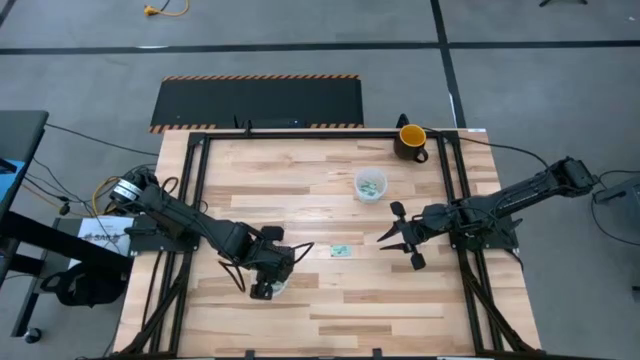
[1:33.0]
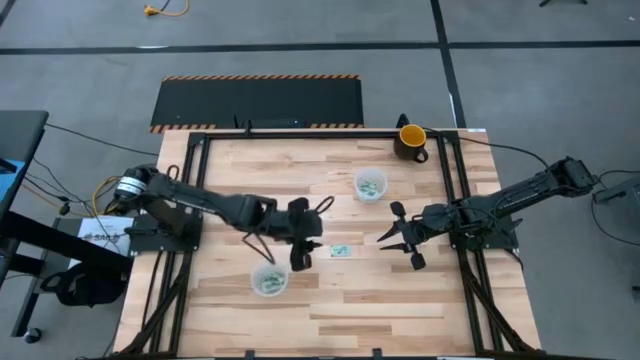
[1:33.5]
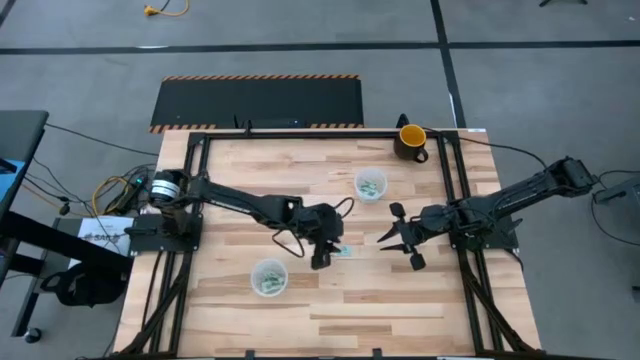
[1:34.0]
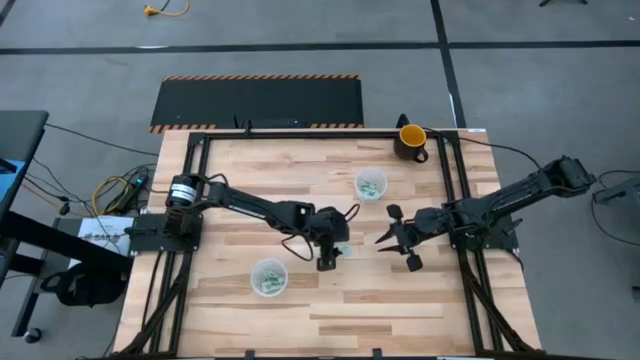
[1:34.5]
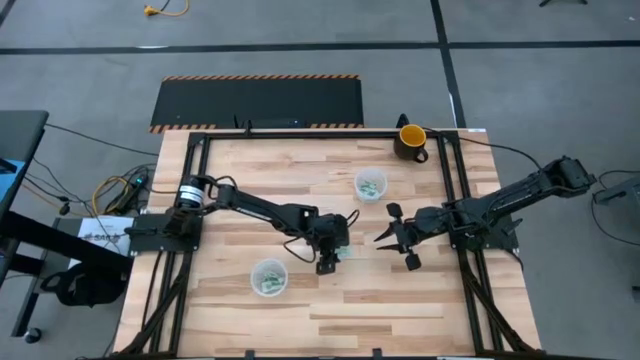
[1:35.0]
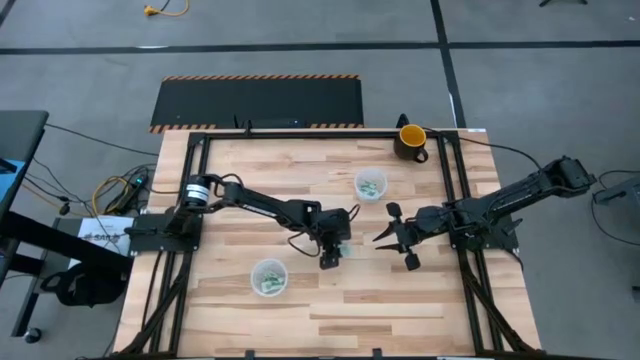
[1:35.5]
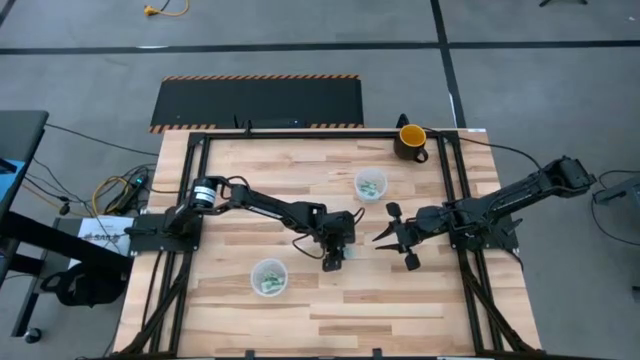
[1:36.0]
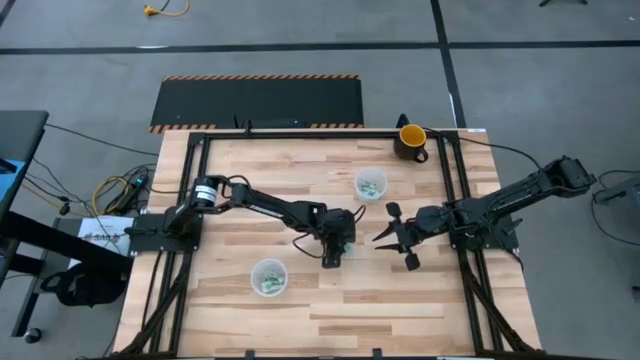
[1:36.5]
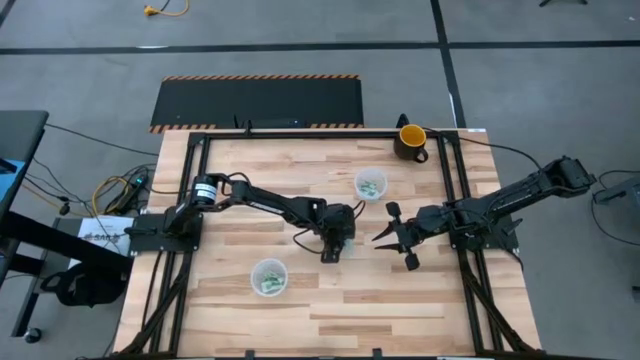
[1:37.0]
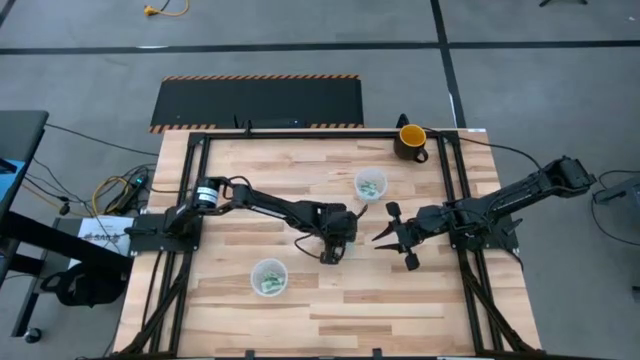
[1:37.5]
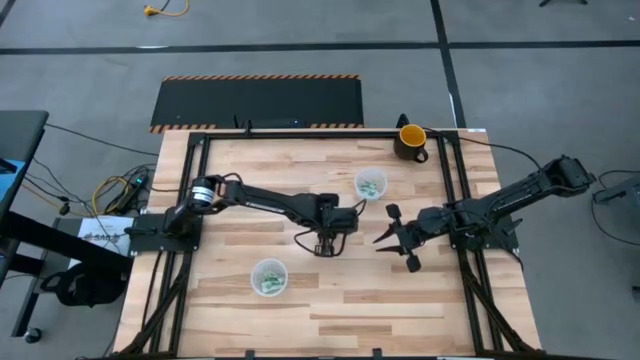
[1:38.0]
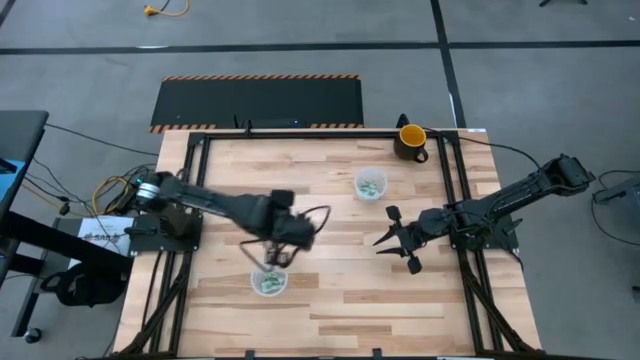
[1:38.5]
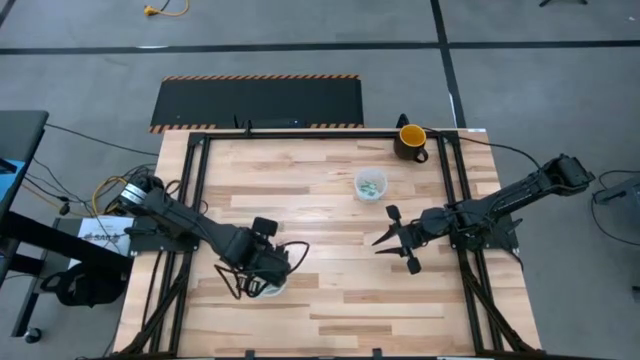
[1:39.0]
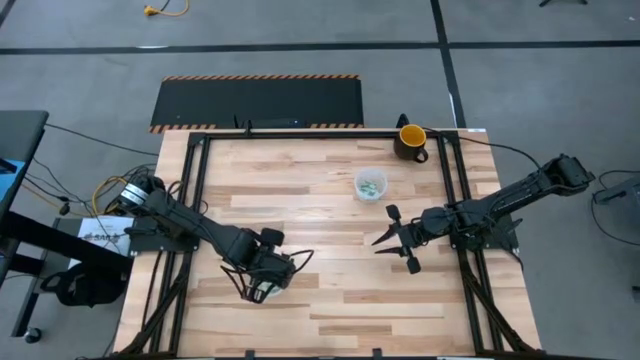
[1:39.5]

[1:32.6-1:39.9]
Task: Pick and place Stevia / Truvia into bins
Put the stevia packet into the bottom transparent container

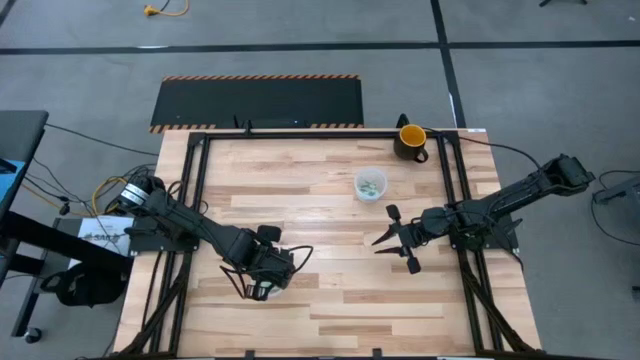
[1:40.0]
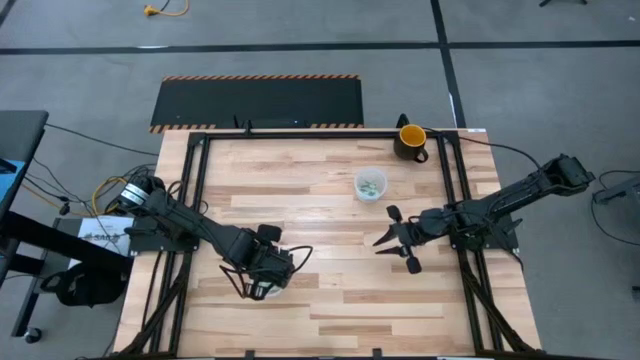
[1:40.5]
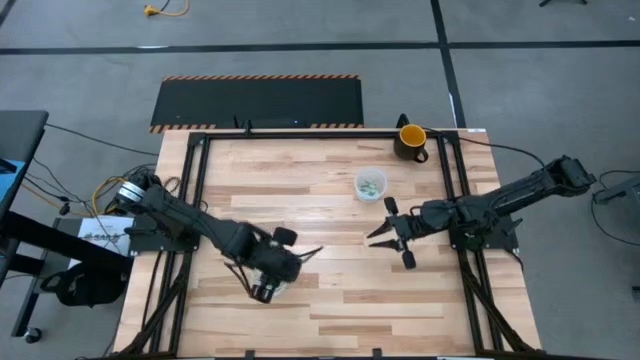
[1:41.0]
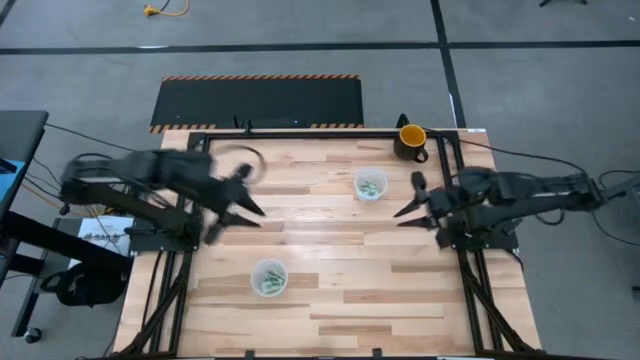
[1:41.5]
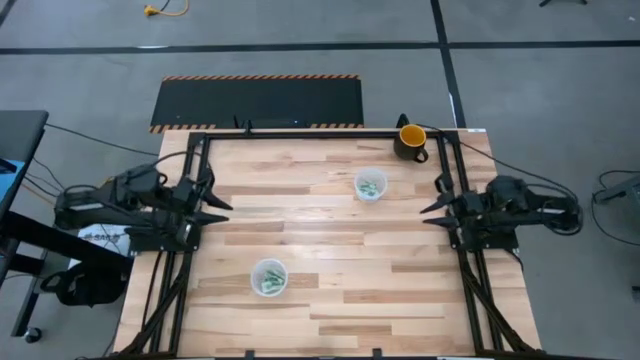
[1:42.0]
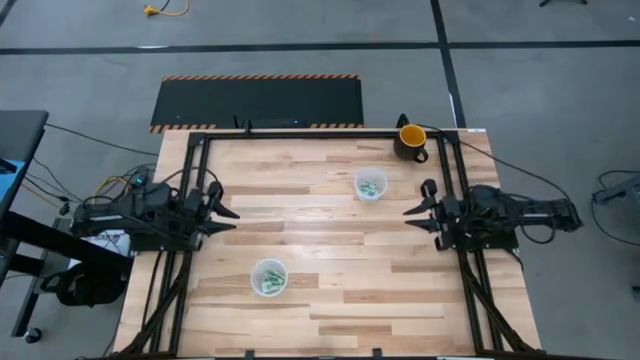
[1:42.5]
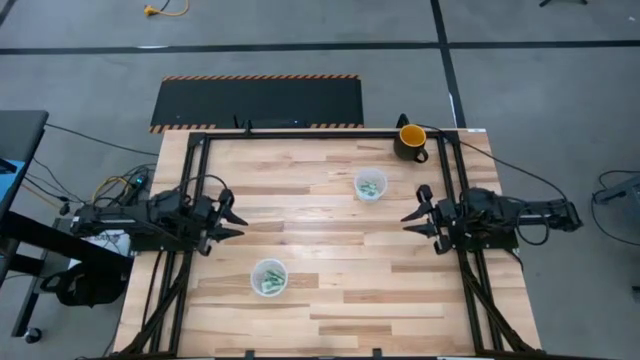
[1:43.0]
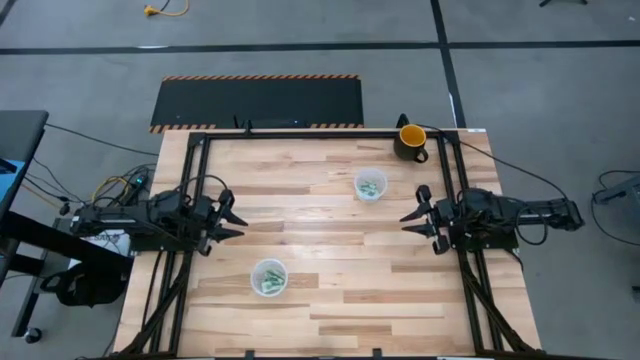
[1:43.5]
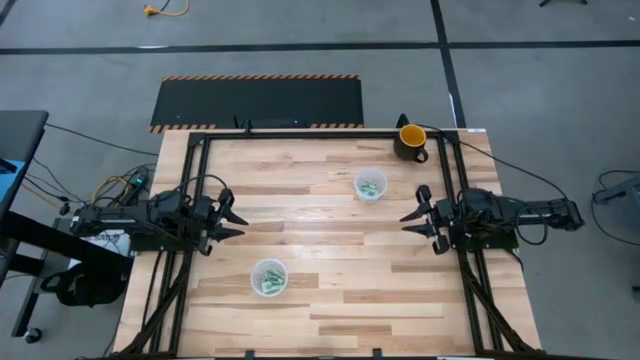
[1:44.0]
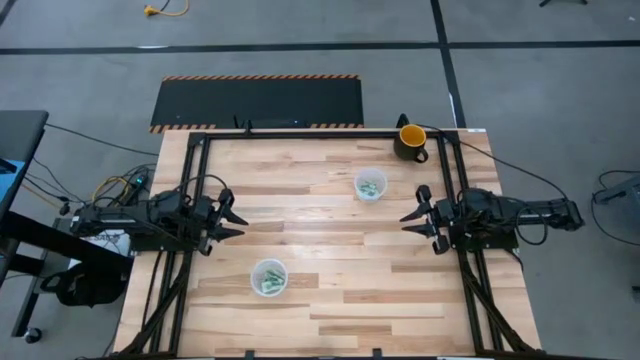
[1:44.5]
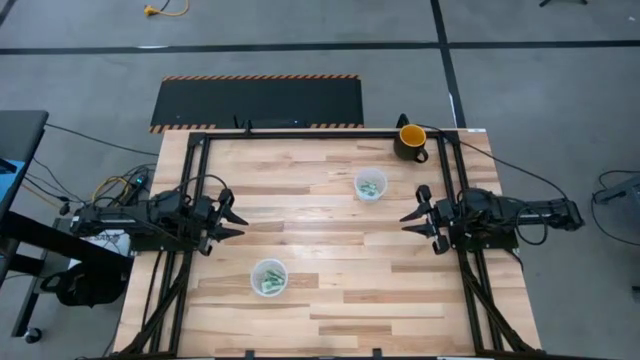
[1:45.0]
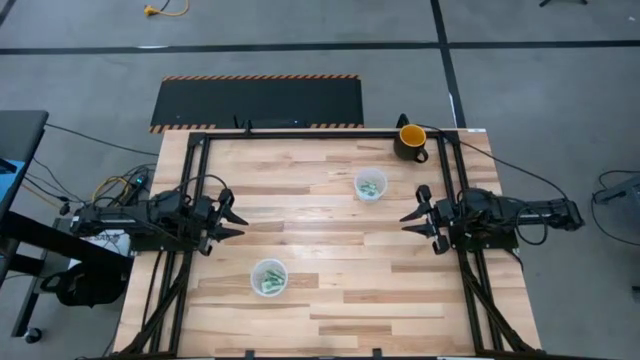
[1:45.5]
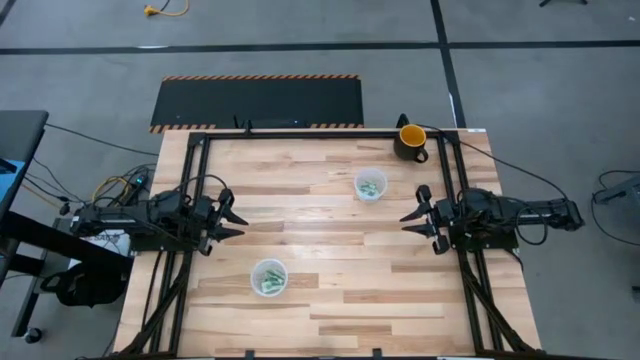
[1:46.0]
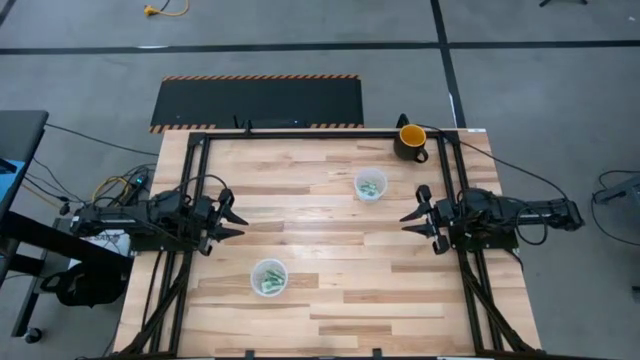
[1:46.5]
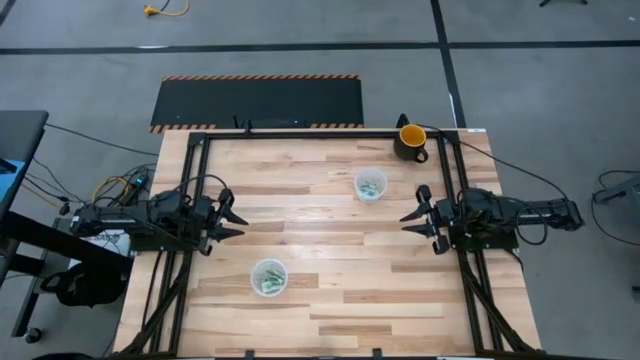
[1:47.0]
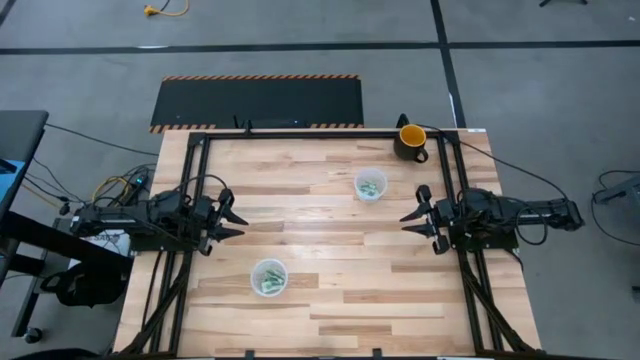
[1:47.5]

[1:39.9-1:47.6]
Return to Home Position

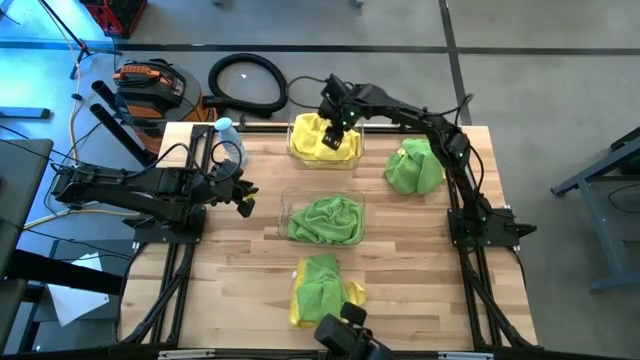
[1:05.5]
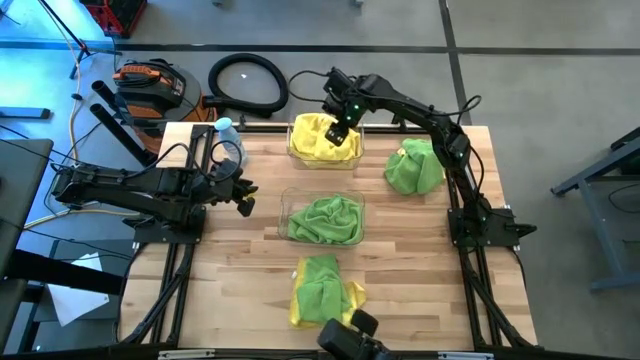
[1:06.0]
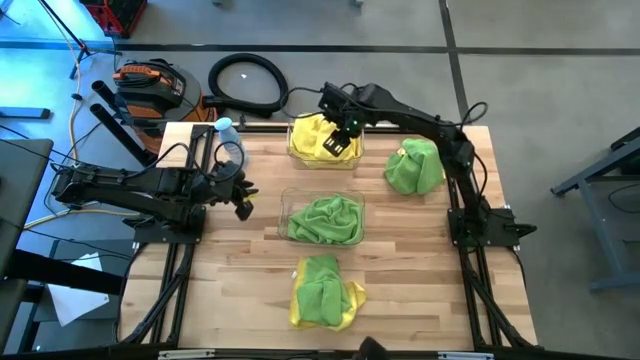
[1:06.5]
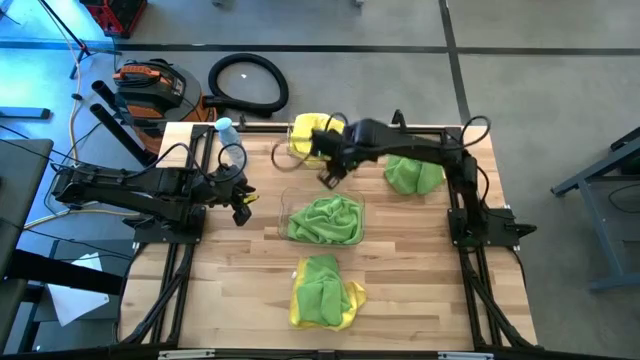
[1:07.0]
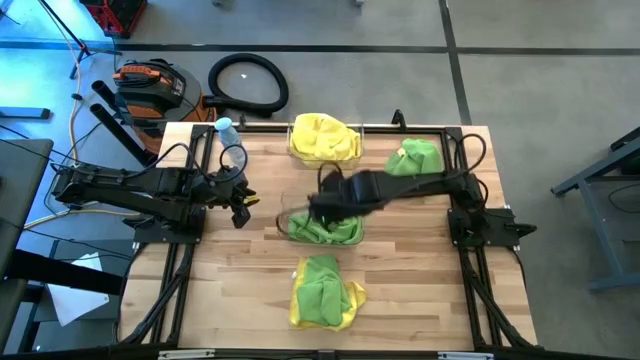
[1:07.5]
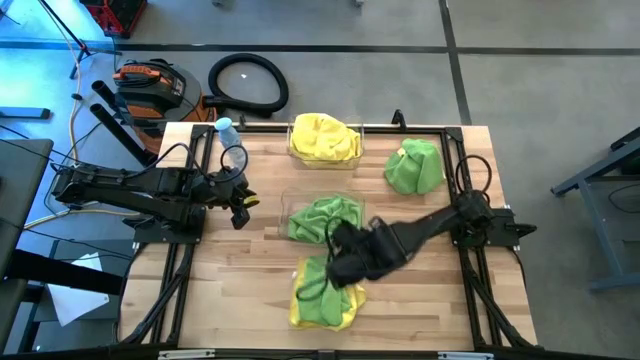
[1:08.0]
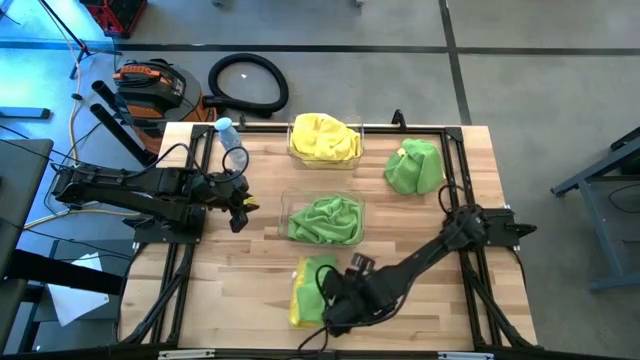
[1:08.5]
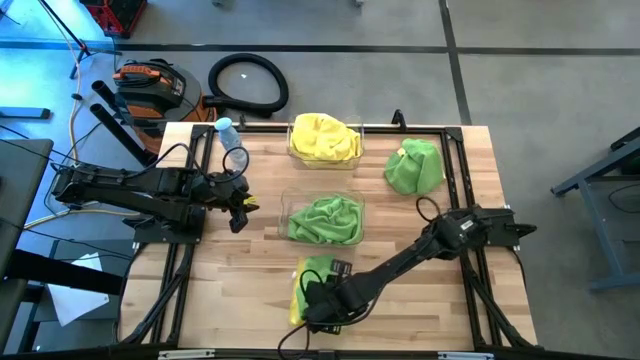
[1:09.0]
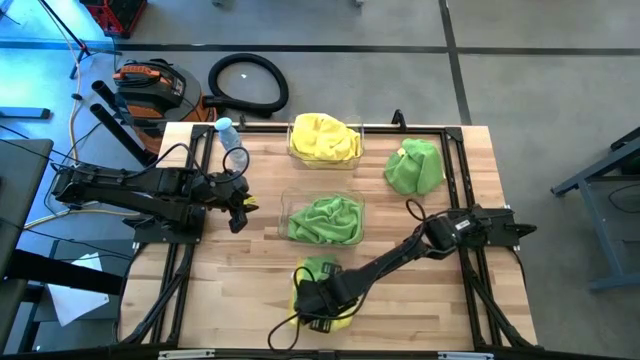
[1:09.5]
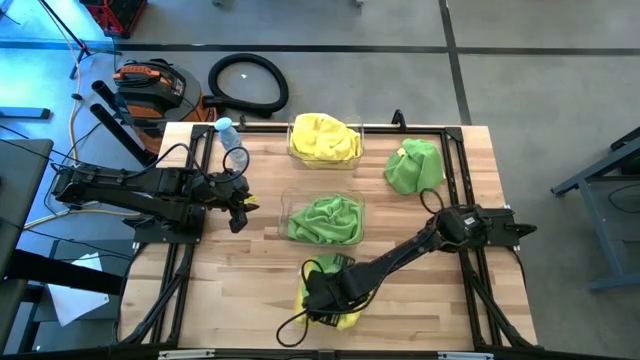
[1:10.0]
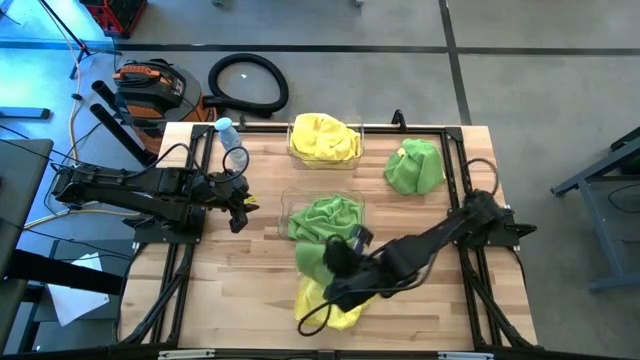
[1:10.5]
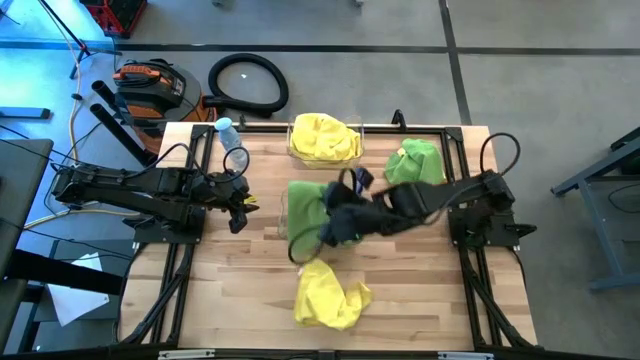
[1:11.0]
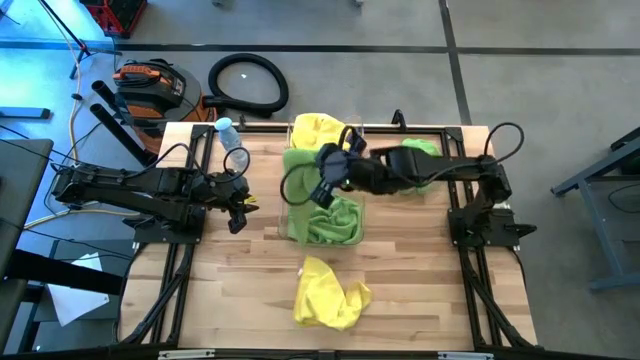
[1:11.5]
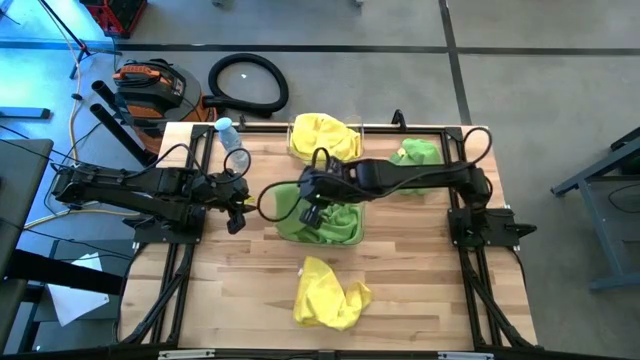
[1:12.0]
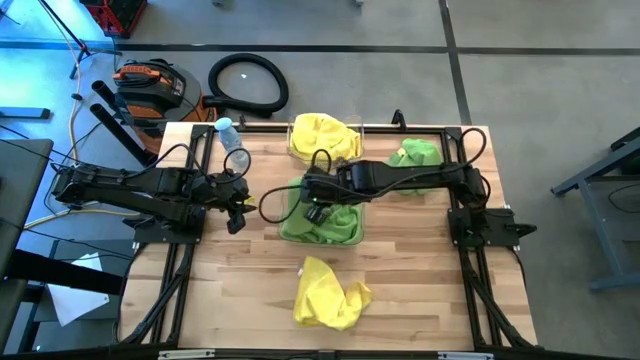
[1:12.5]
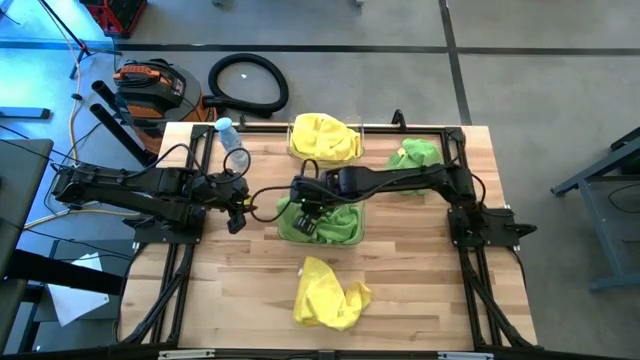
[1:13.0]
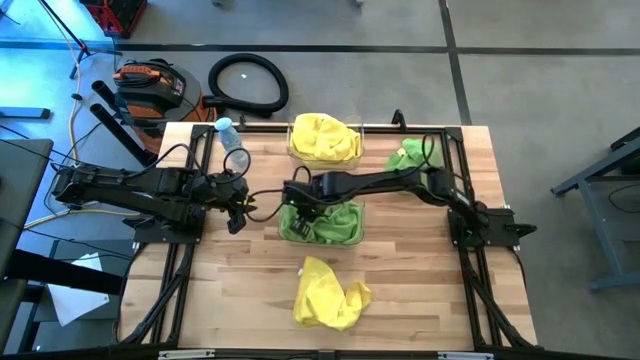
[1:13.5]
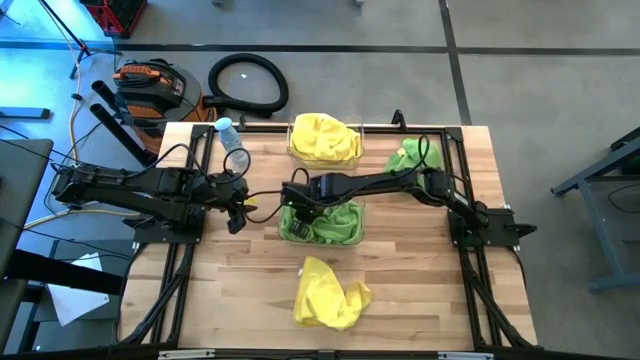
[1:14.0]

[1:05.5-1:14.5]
Task: Sort microfiber towel by color & place in baskets
Put the green towel into the bottom transparent bin
